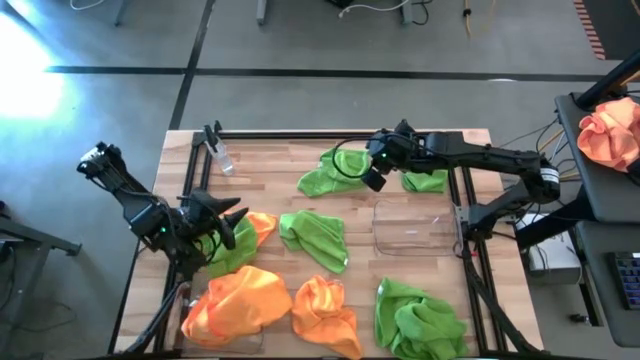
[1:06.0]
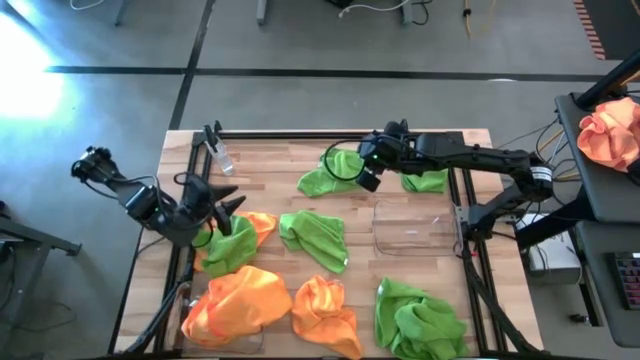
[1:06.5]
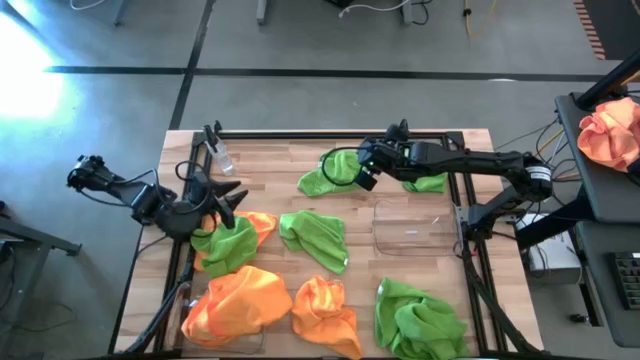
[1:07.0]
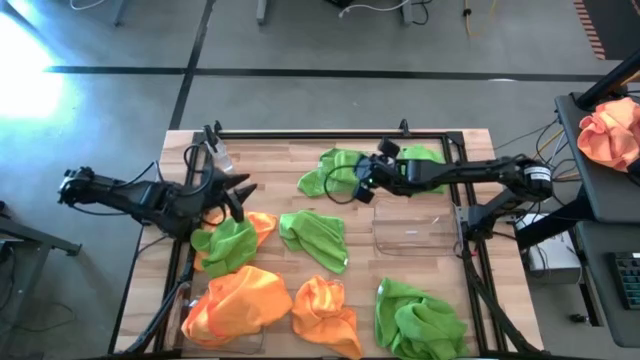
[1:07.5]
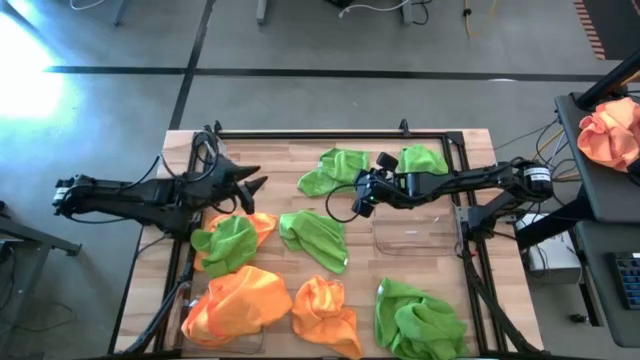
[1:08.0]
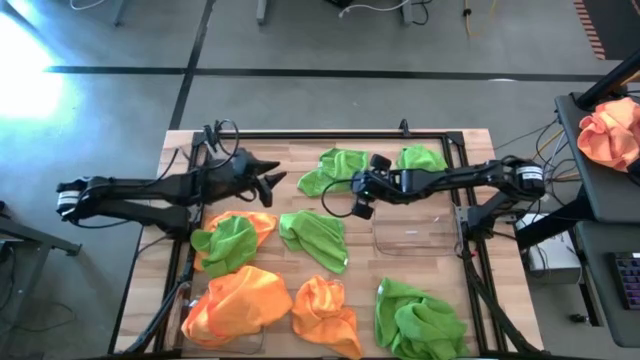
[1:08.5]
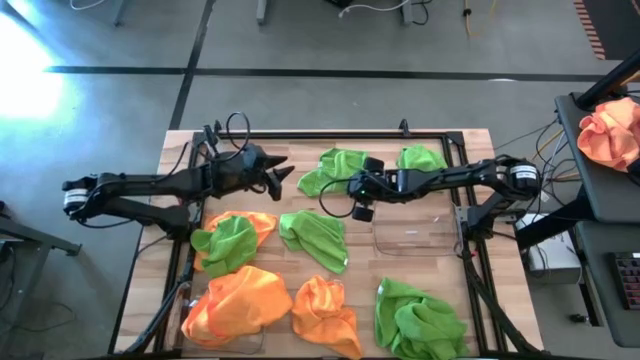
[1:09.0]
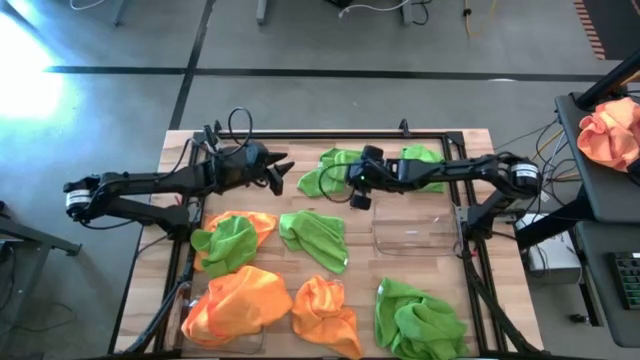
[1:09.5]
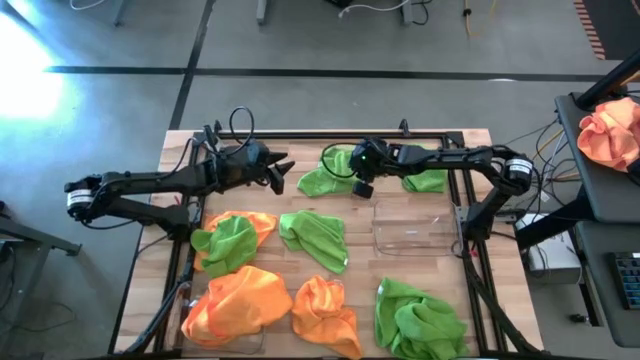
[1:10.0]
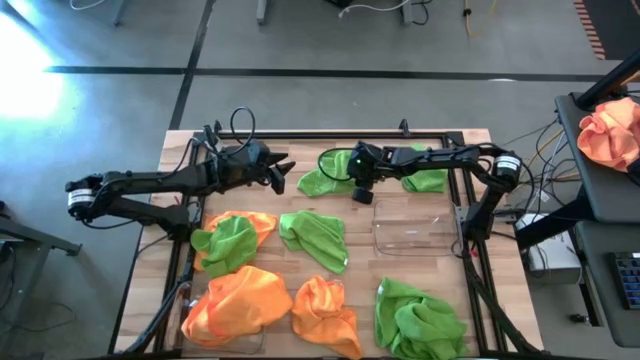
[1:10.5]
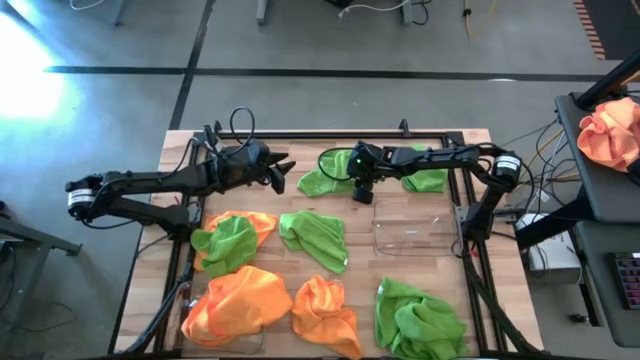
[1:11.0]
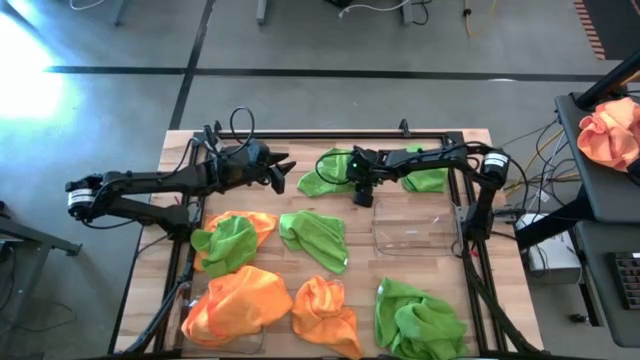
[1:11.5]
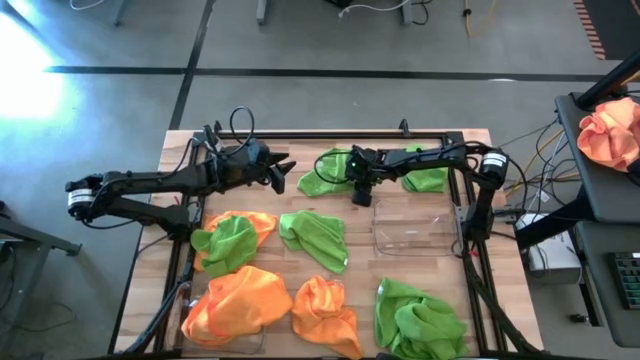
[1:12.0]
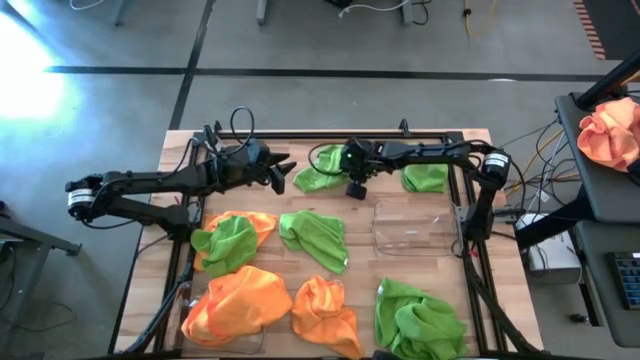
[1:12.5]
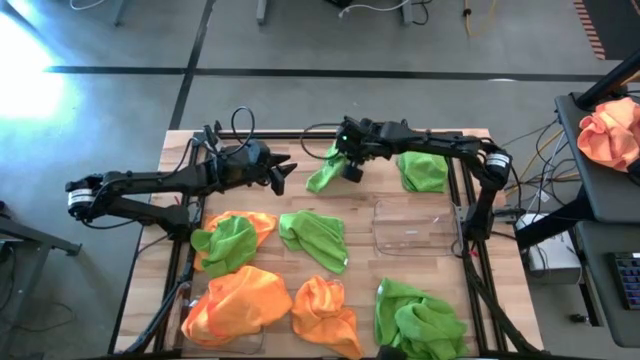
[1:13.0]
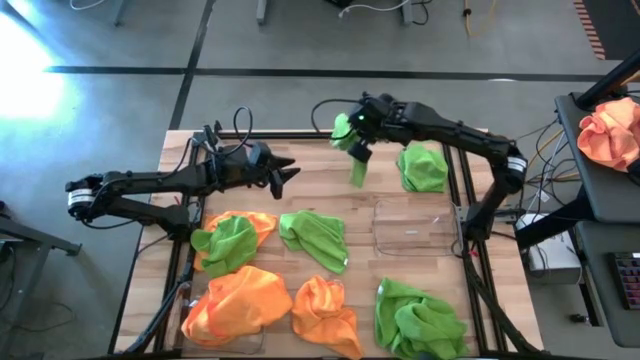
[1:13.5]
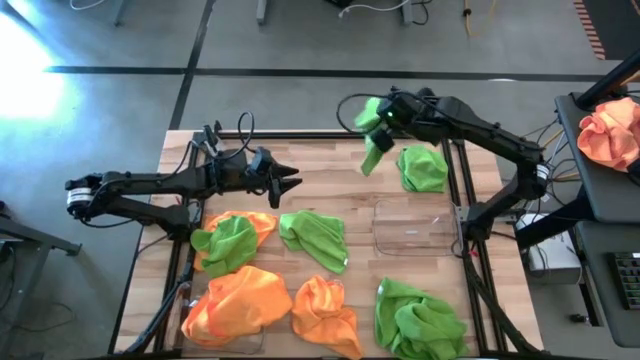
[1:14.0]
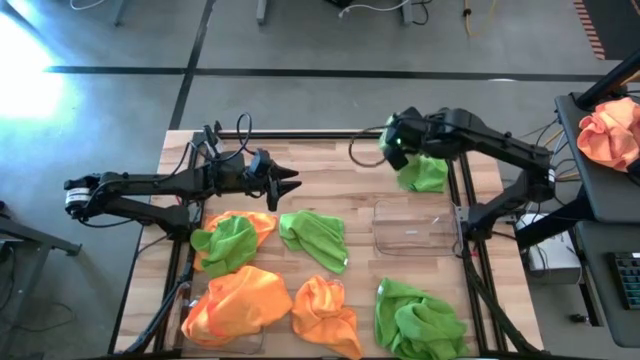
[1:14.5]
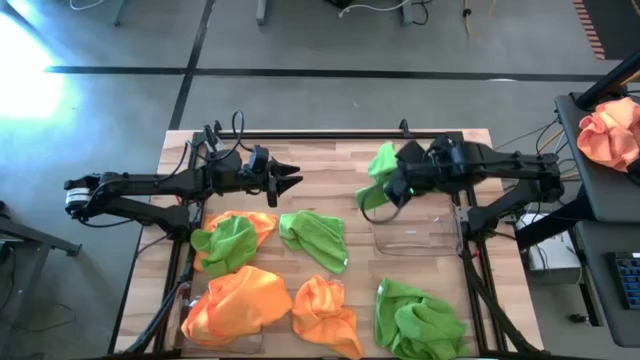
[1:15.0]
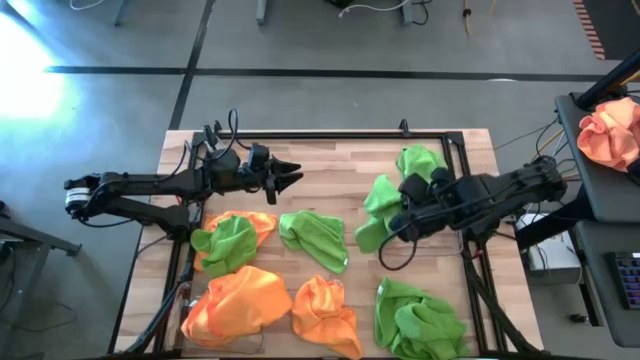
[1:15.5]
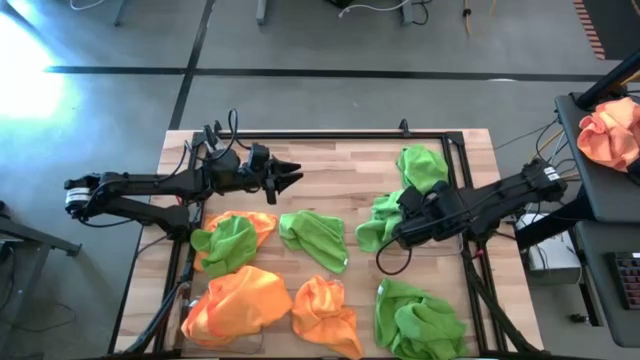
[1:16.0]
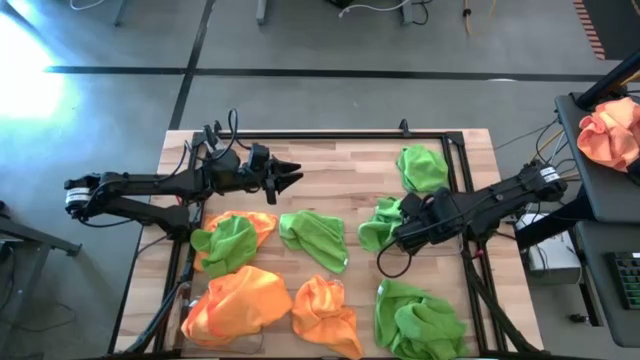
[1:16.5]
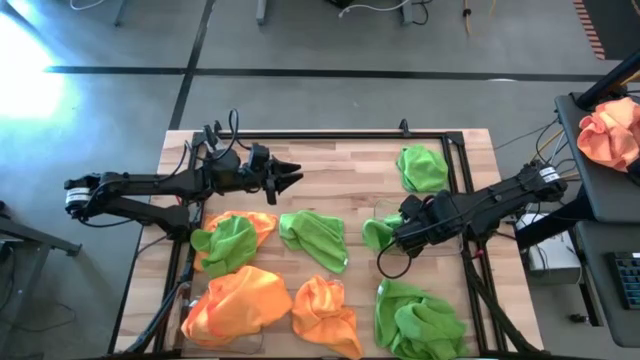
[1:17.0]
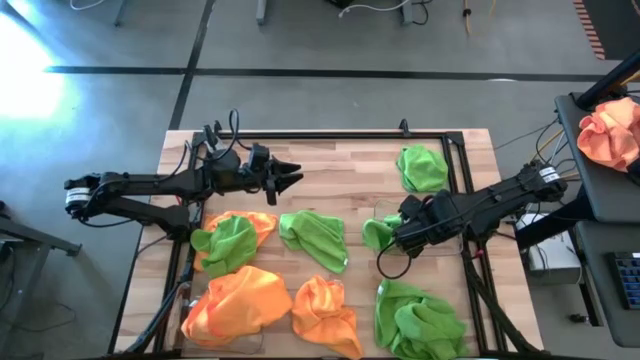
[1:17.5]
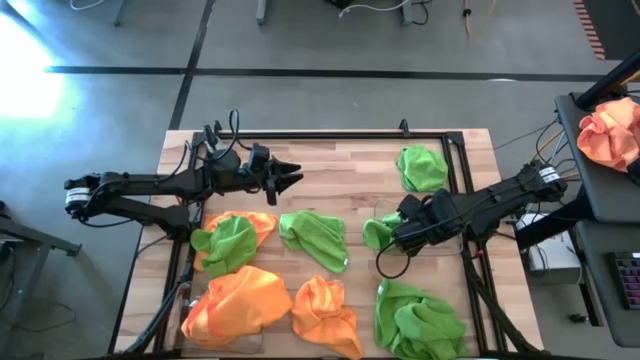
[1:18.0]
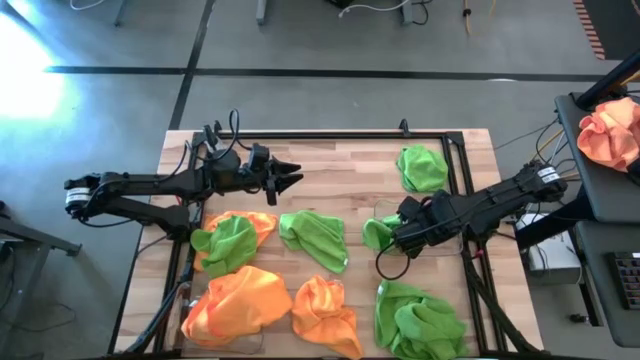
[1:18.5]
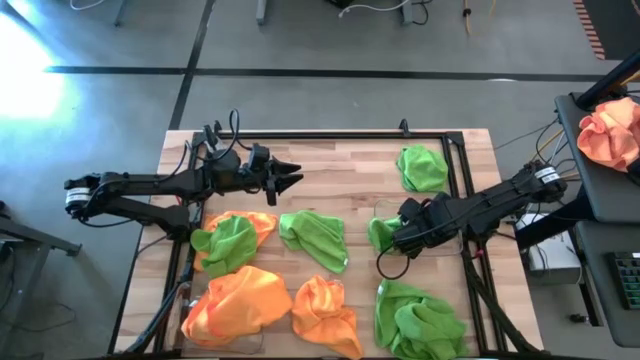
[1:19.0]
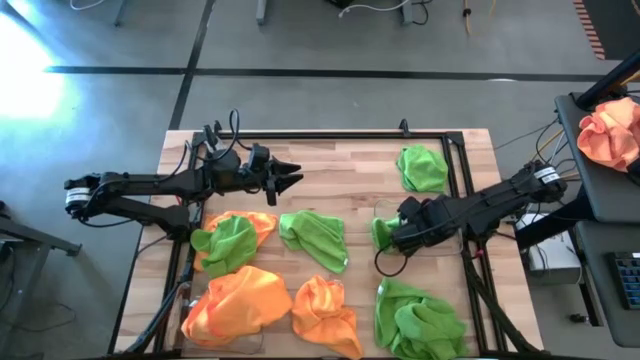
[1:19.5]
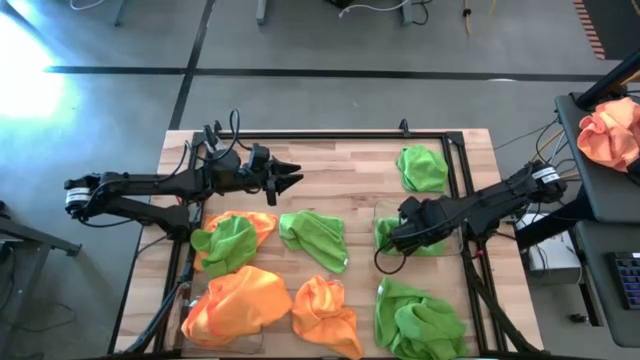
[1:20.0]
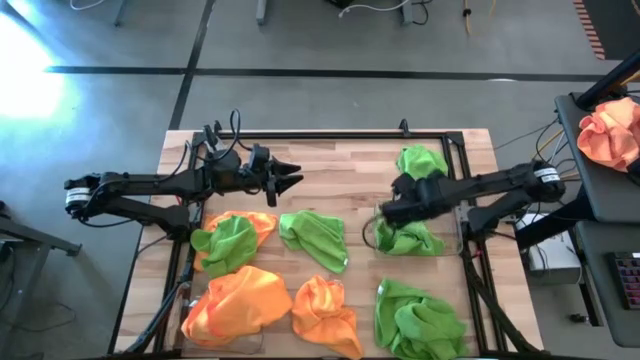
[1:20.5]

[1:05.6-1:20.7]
Task: Sort microfiber towel by color & place in baskets
Put the top center green towel into the right transparent bin

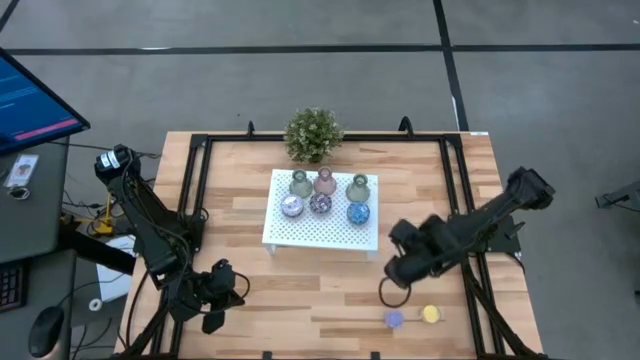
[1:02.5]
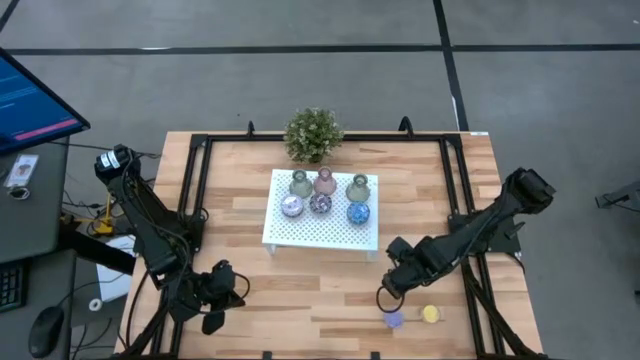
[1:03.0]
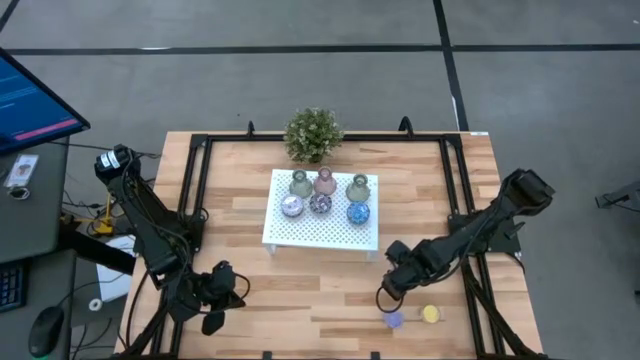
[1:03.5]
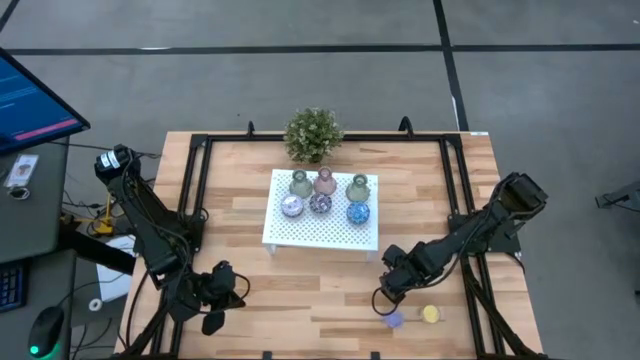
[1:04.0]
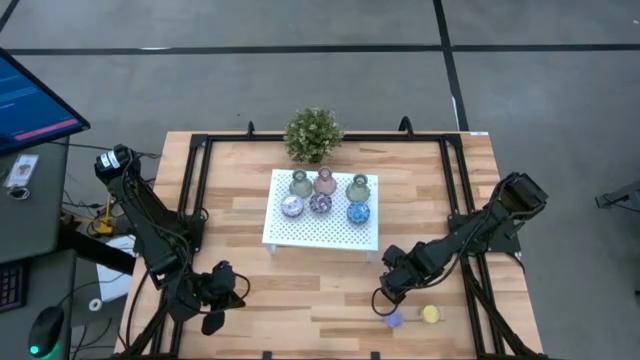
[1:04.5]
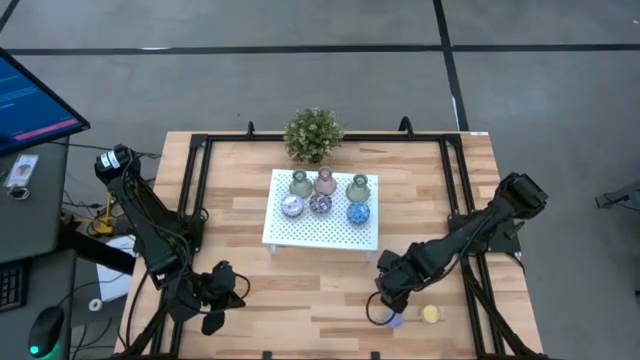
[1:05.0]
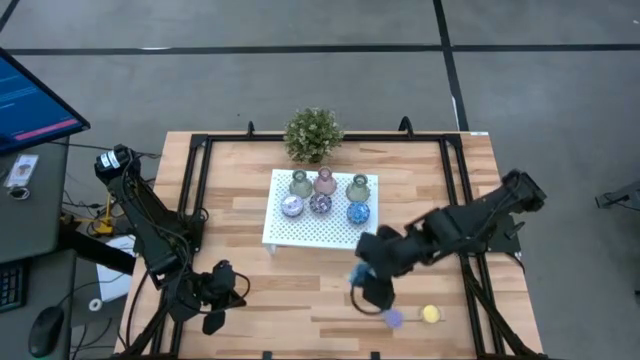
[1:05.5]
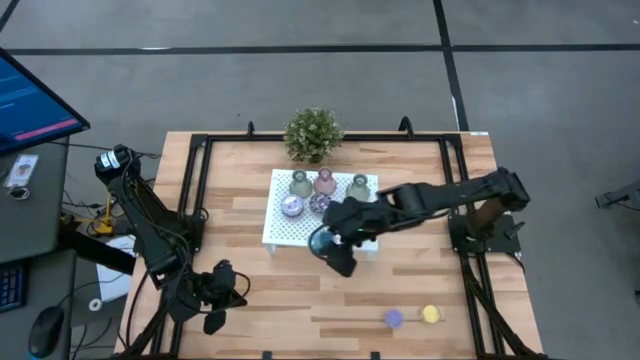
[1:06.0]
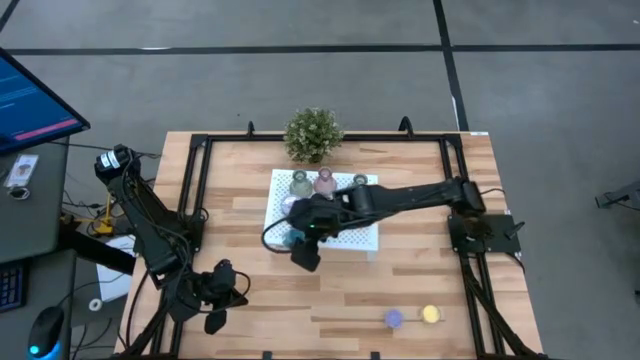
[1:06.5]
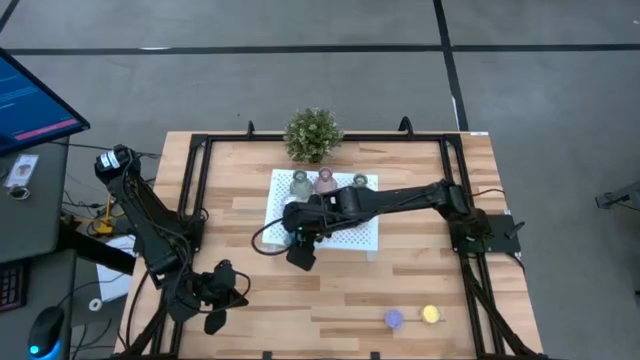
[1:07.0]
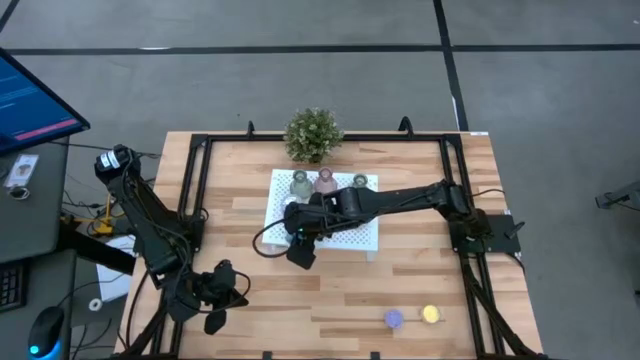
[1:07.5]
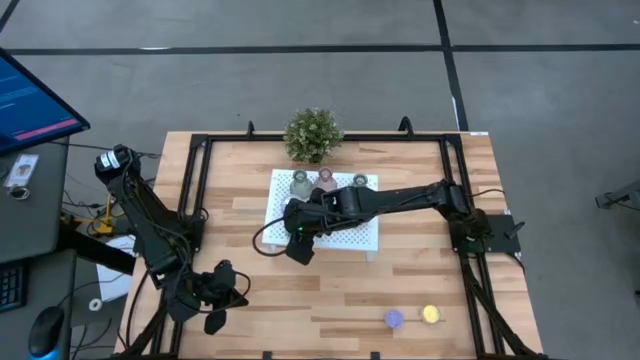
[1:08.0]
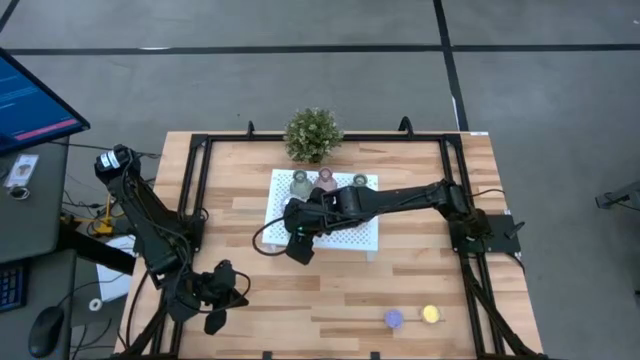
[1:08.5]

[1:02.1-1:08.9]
Task: Pick & Place candle stick holders
Put the blue candle on the shelf
